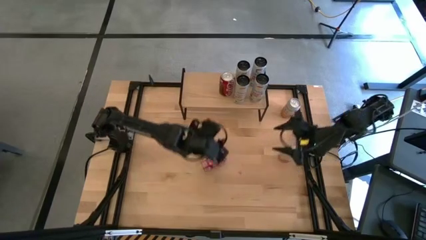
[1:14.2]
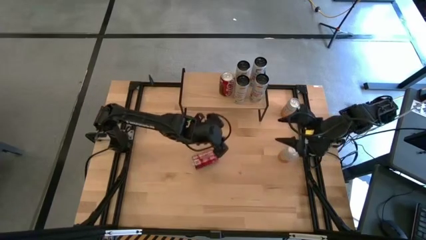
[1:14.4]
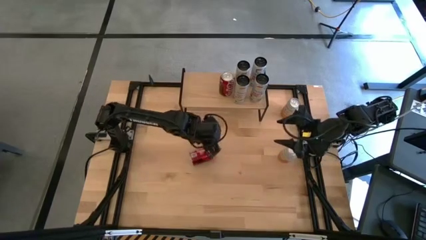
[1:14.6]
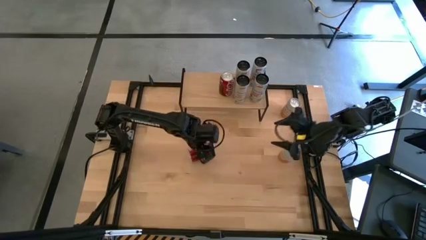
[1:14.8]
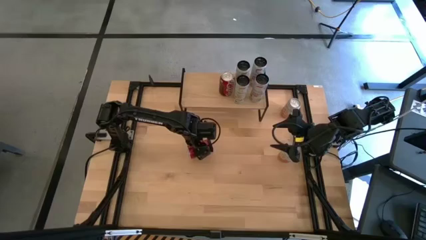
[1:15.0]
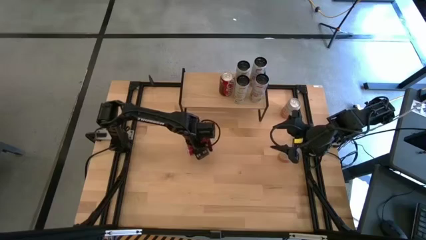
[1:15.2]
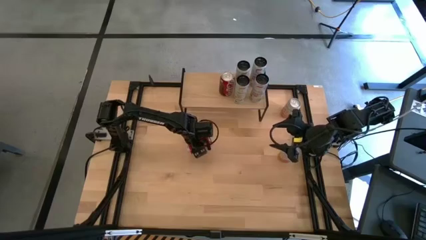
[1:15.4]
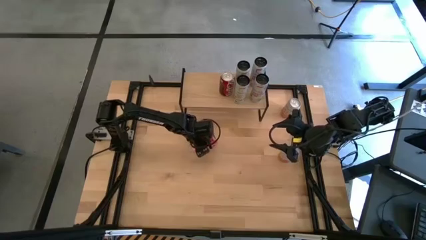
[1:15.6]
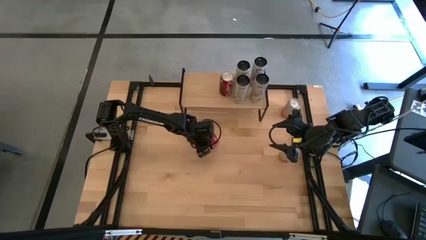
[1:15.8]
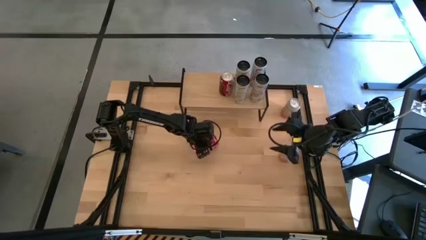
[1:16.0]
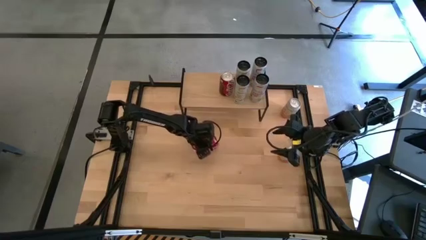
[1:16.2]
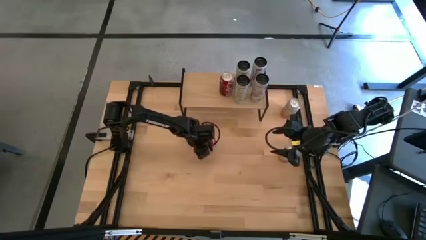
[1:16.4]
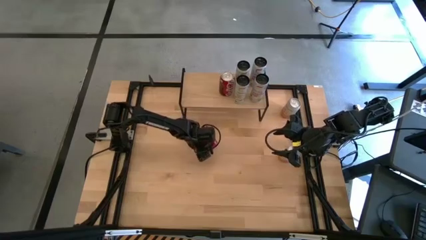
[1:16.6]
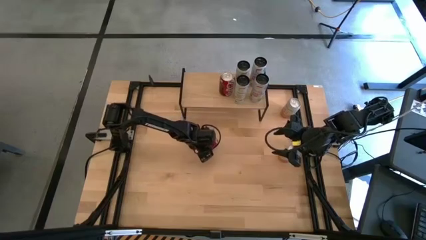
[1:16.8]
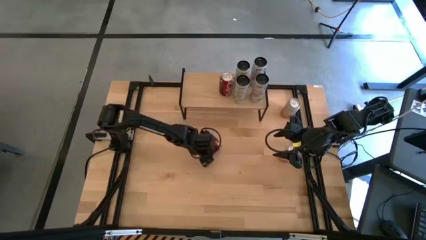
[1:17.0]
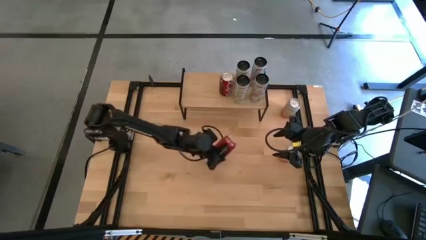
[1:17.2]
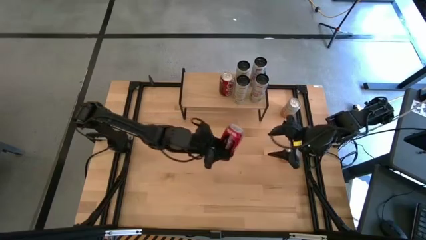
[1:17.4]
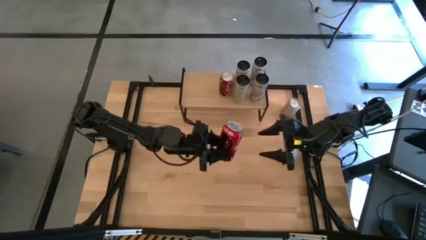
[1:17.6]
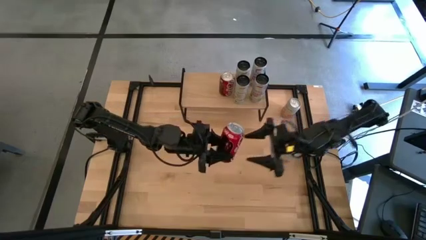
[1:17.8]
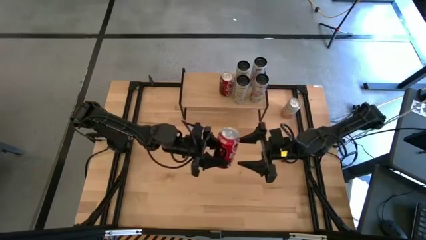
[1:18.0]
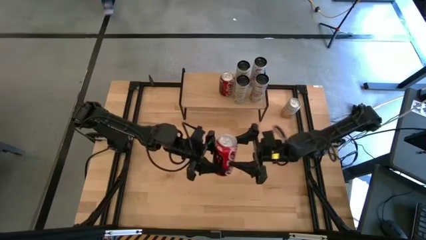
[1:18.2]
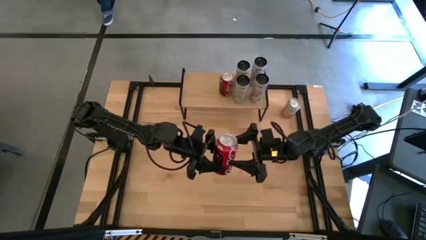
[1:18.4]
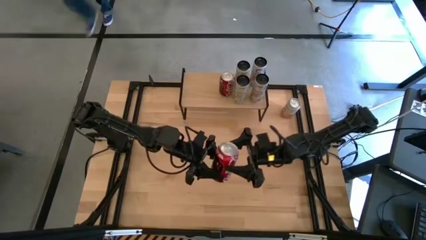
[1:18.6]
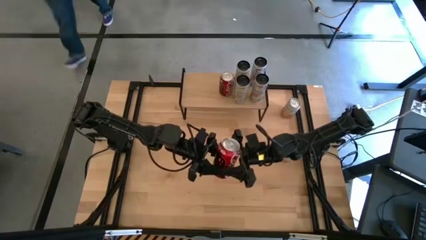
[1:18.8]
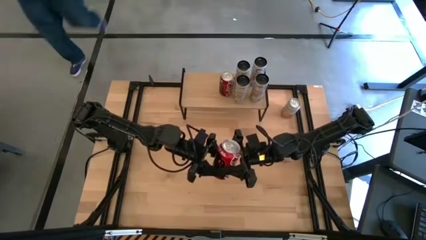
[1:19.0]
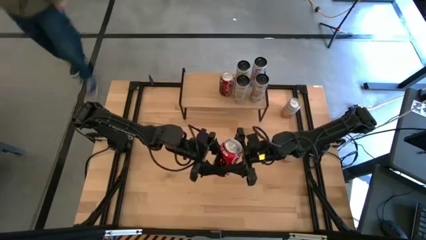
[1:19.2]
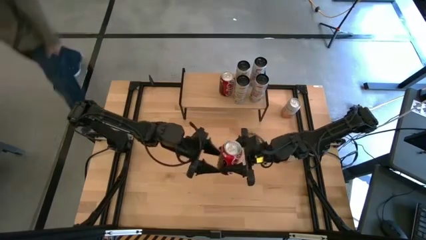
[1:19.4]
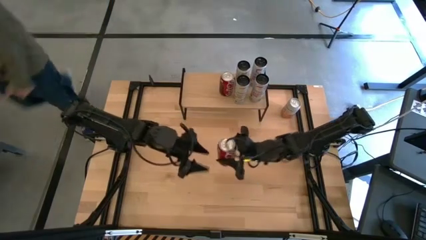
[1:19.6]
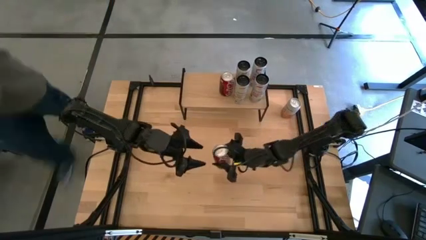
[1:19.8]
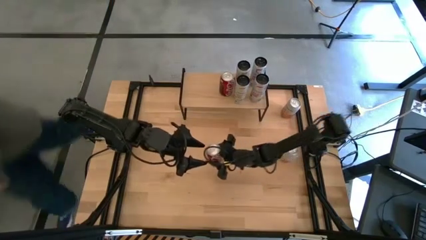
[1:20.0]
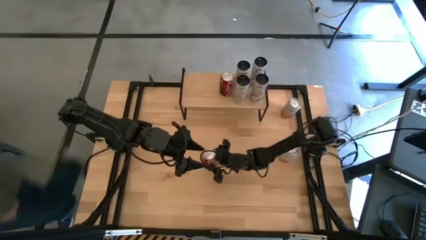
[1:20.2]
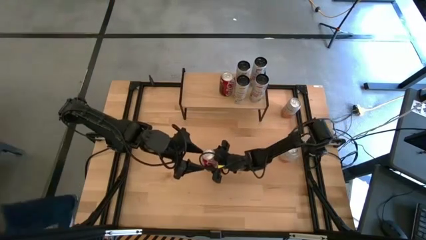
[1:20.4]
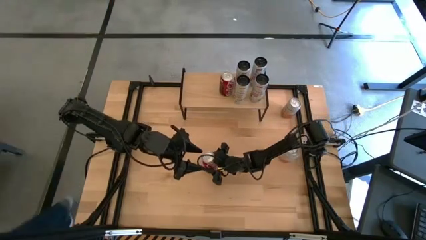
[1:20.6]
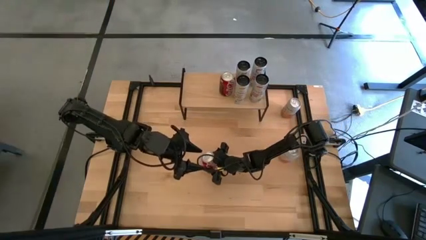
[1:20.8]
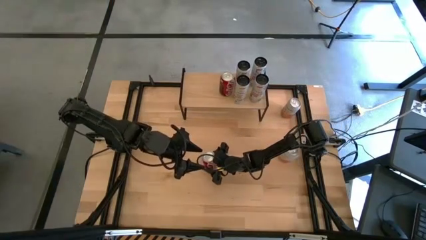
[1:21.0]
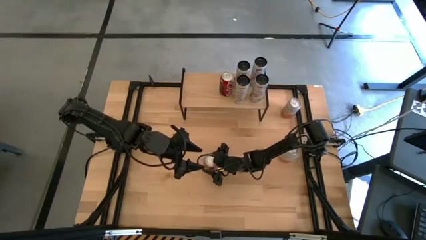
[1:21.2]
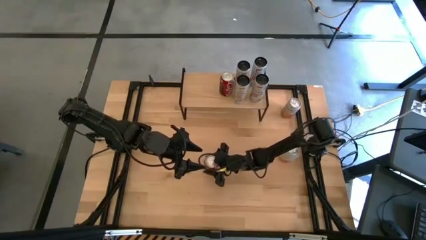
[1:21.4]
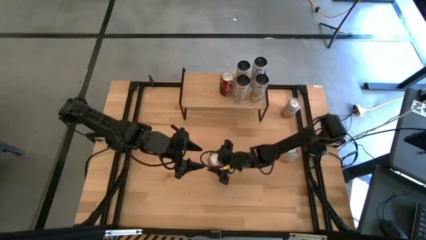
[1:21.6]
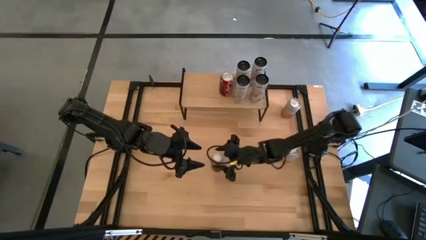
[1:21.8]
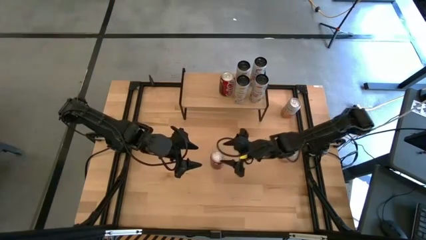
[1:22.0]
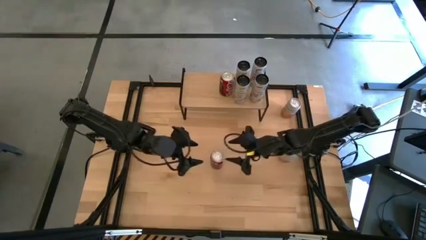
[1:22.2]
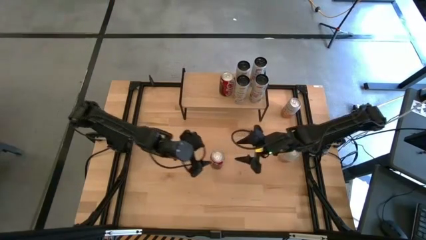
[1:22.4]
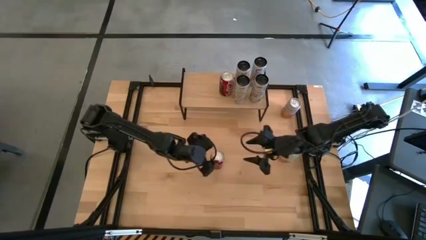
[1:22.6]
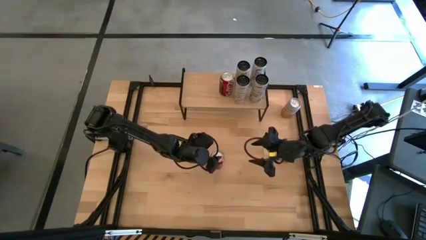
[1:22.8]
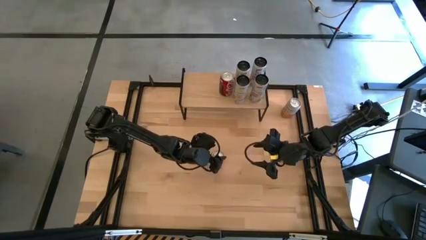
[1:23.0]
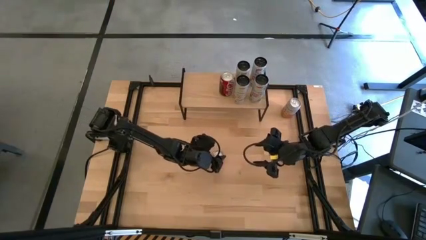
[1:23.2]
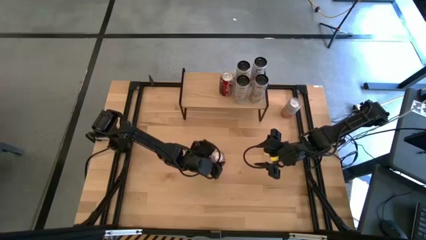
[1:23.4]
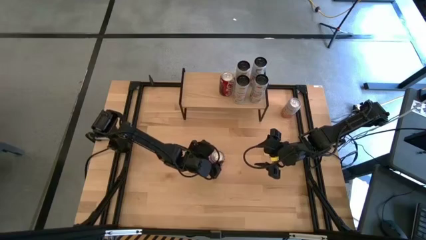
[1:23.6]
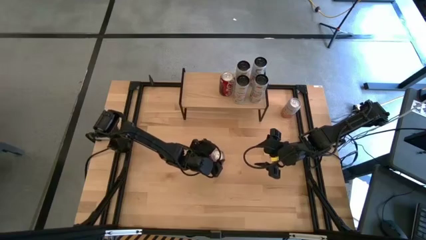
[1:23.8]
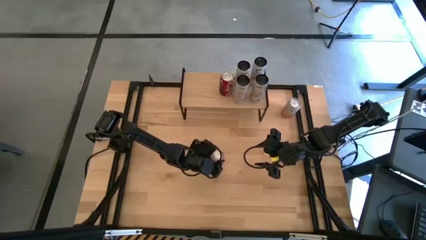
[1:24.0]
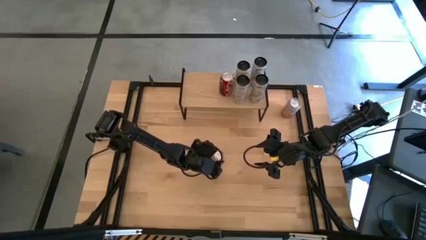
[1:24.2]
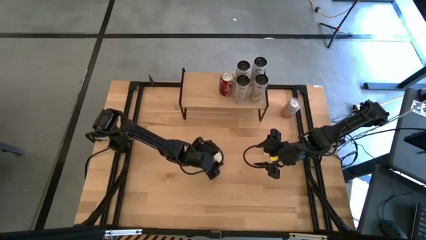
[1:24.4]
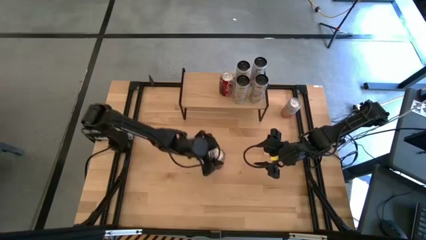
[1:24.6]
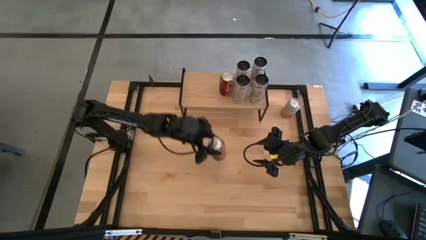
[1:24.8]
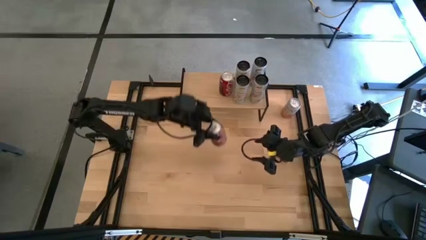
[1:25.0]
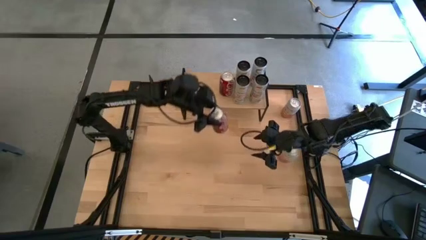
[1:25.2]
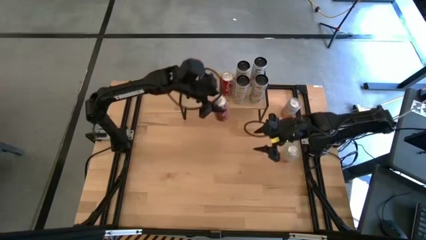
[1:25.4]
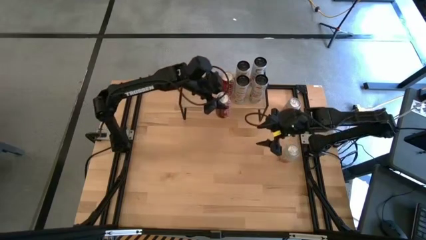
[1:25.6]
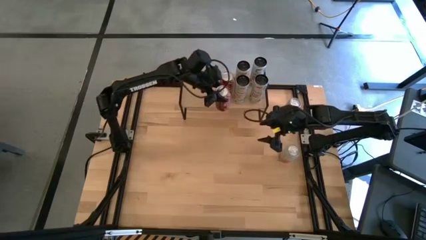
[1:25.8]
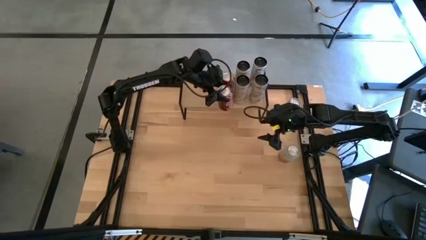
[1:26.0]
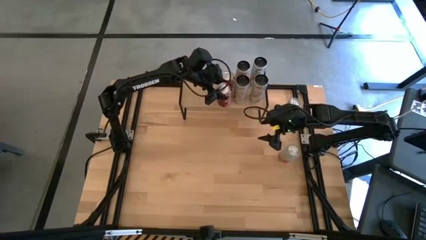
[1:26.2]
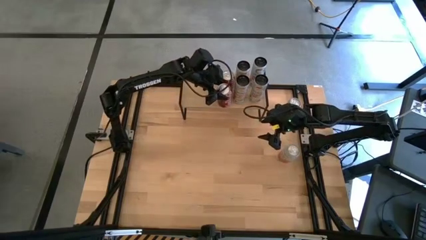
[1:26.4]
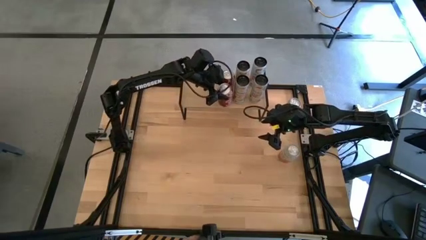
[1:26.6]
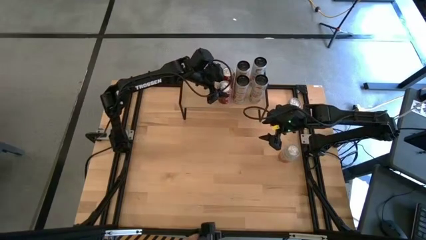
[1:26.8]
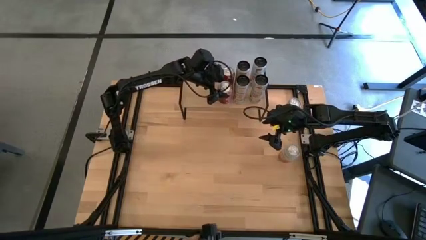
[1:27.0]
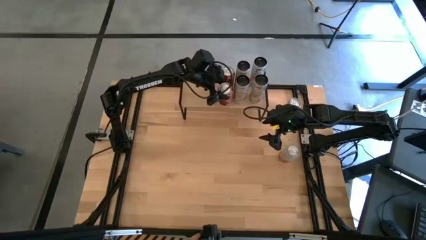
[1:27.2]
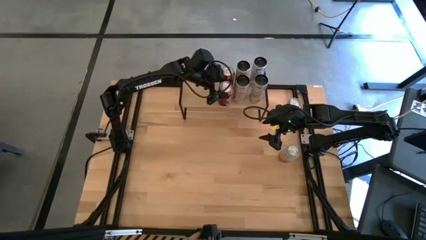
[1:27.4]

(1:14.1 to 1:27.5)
Task: Place canned beverage on shelf
Put the red-white soda can on the shelf aligned with the other red-white soda can

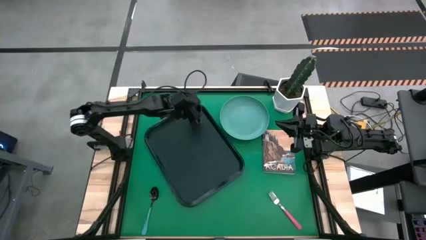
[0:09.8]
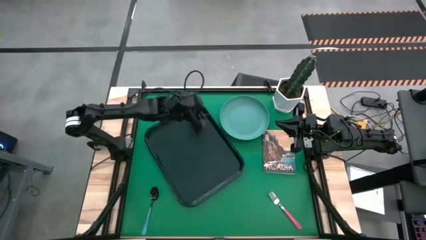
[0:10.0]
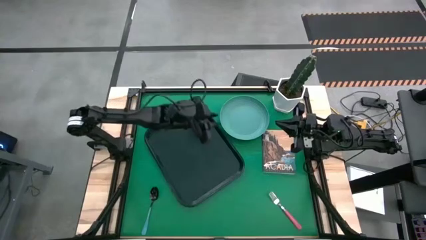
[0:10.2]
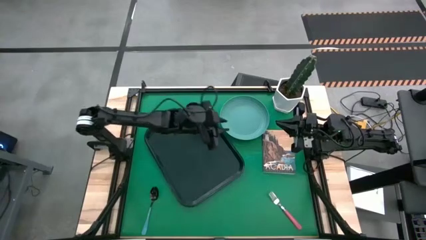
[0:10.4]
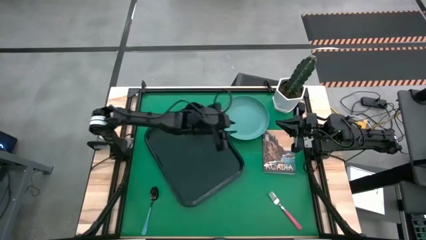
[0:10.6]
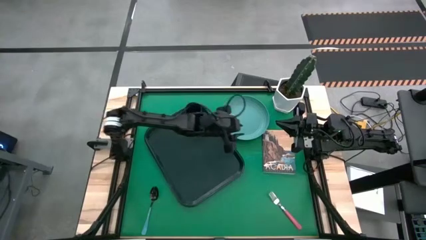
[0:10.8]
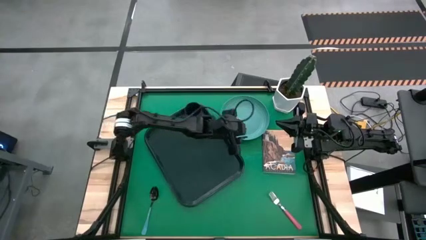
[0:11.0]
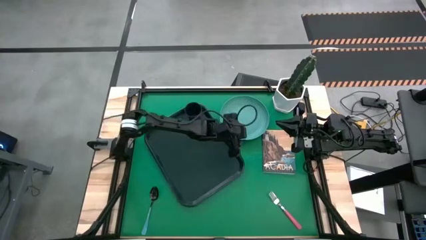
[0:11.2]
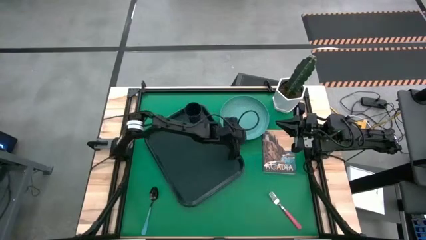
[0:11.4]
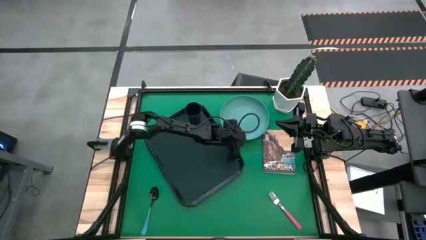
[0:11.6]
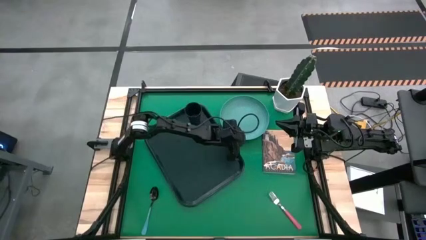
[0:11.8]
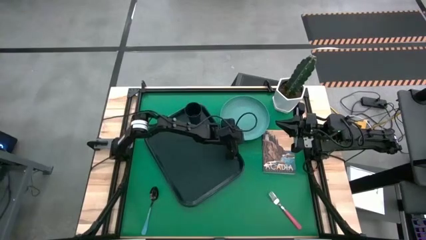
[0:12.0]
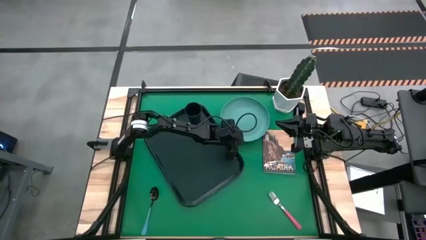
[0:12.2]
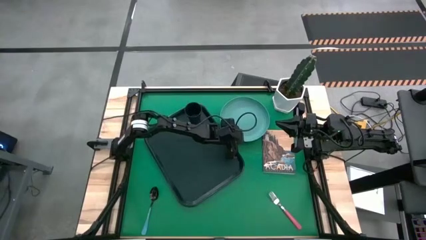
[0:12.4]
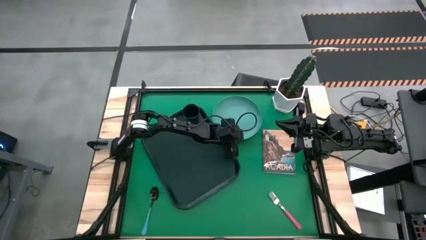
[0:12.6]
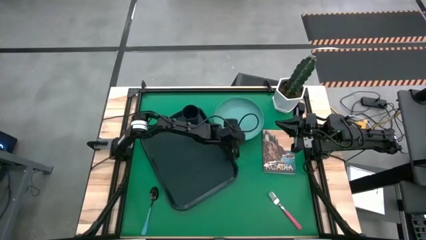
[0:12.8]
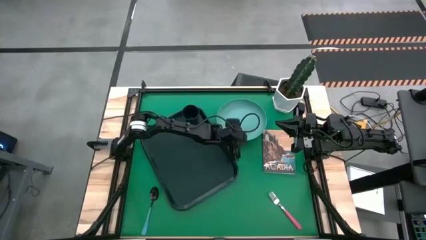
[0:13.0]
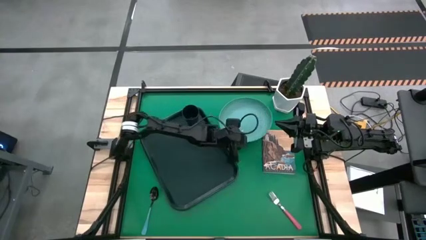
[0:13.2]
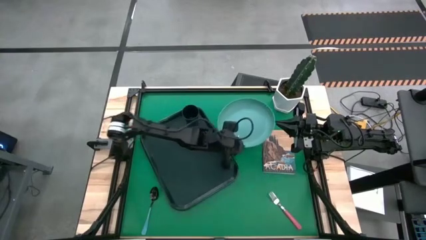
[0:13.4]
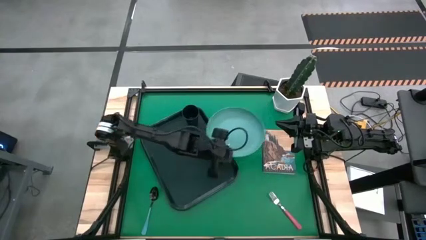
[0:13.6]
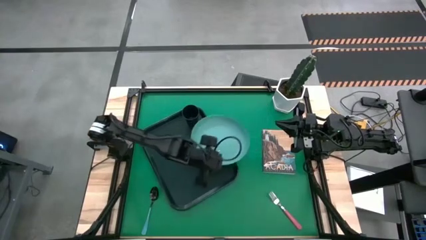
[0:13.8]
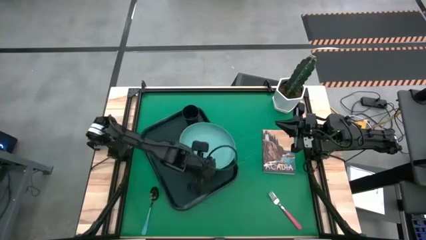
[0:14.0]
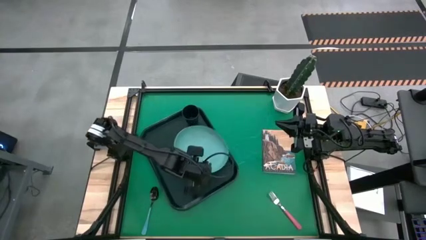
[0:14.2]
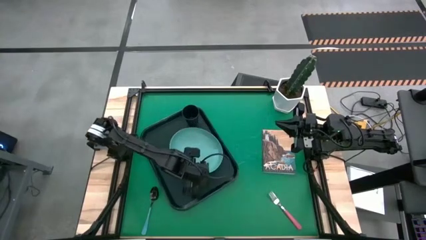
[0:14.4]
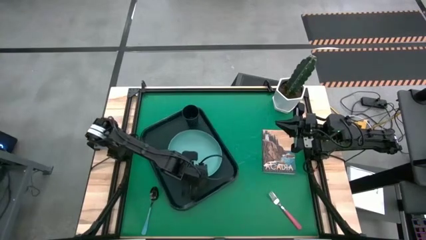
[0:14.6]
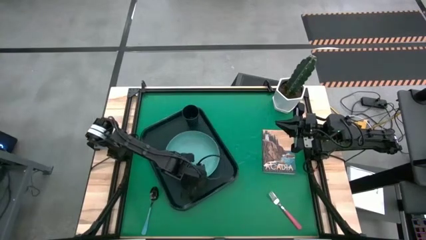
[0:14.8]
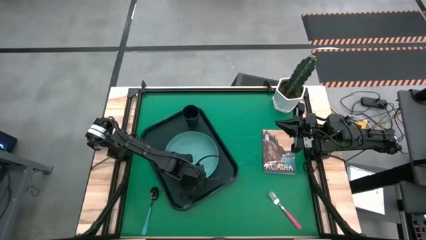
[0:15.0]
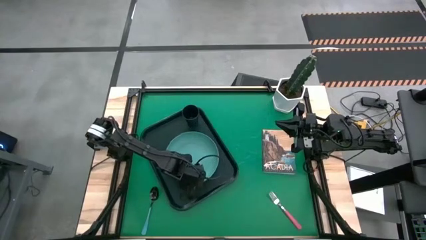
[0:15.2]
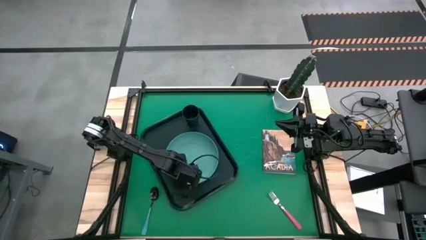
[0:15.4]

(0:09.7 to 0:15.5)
Task: Pick and place plate/cup/fork/spoon on tray
Put the blue plate on the black serving tray at the bottom of the black cup
